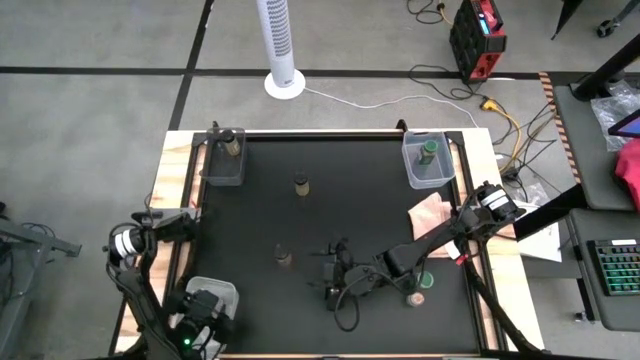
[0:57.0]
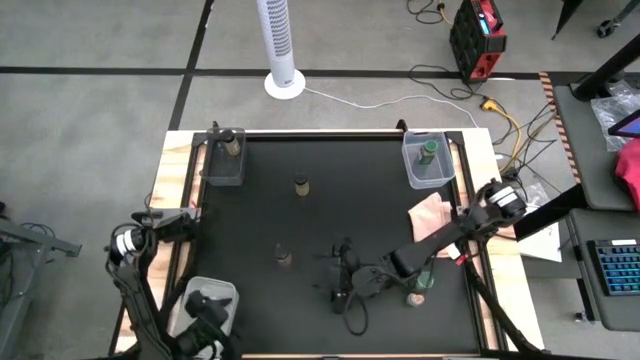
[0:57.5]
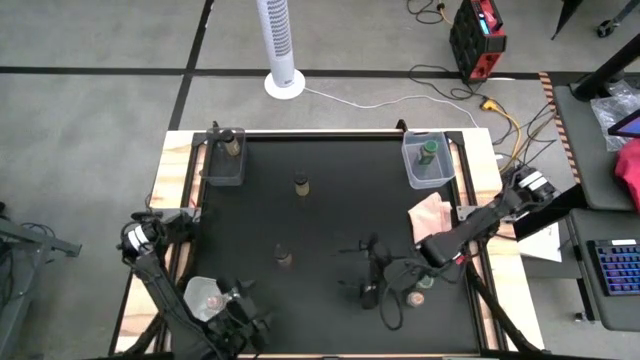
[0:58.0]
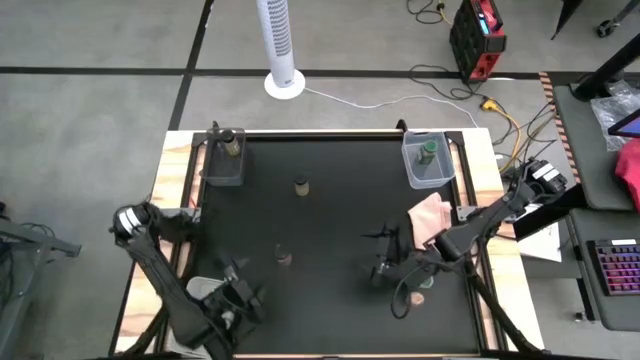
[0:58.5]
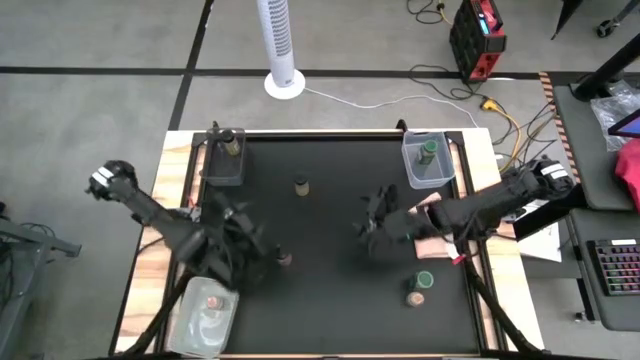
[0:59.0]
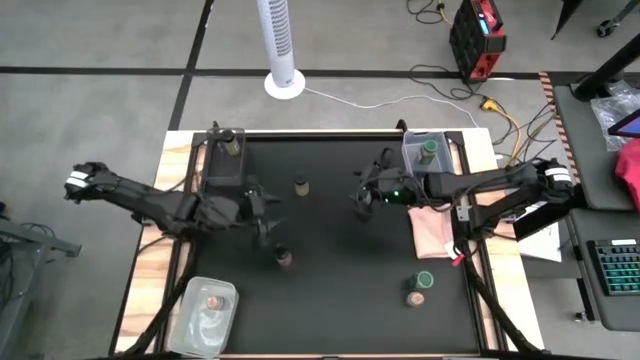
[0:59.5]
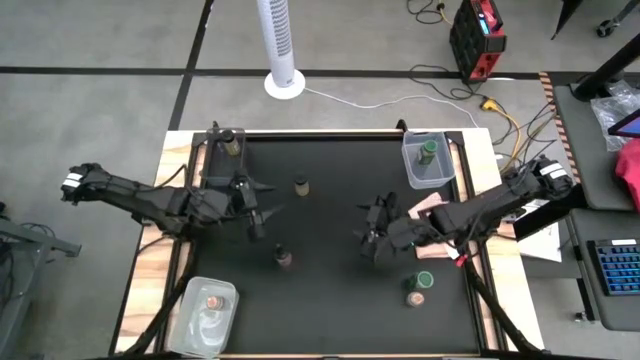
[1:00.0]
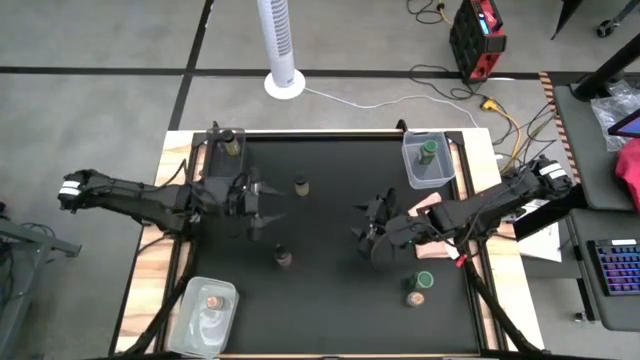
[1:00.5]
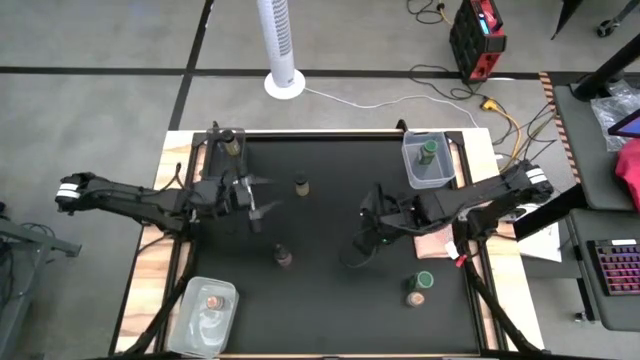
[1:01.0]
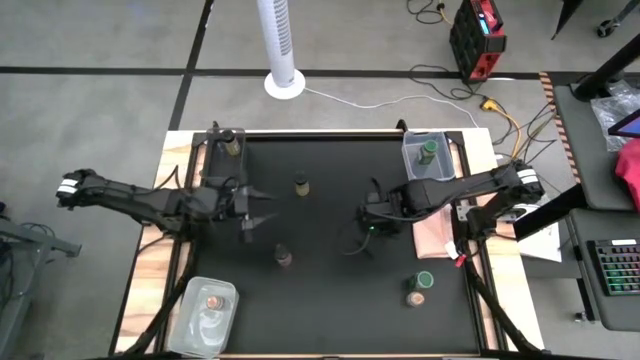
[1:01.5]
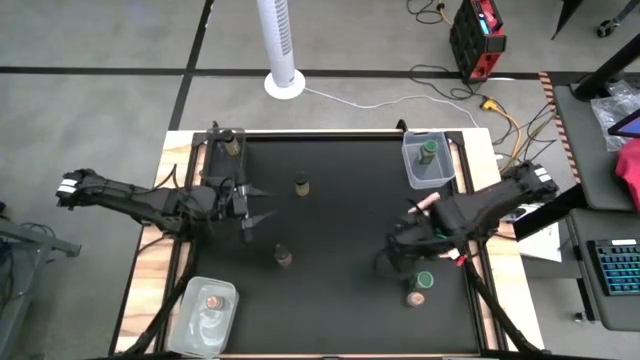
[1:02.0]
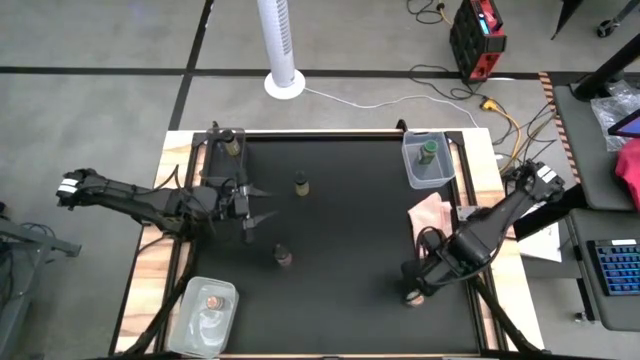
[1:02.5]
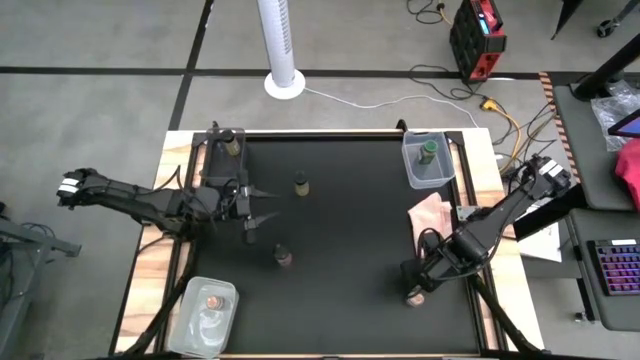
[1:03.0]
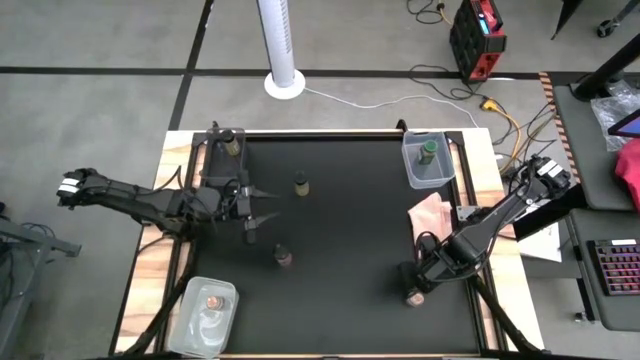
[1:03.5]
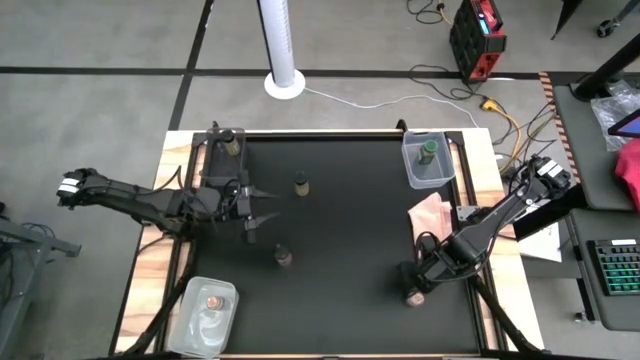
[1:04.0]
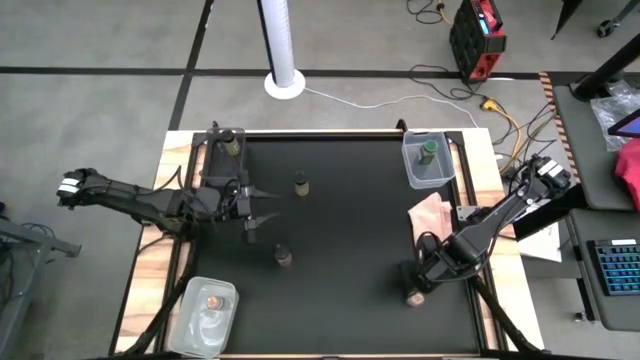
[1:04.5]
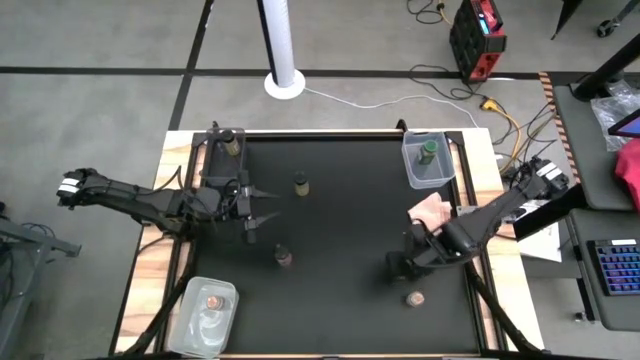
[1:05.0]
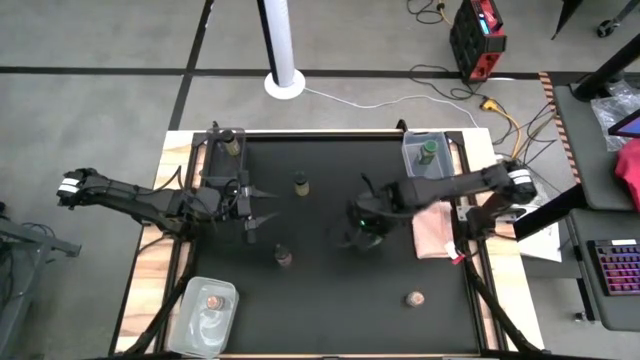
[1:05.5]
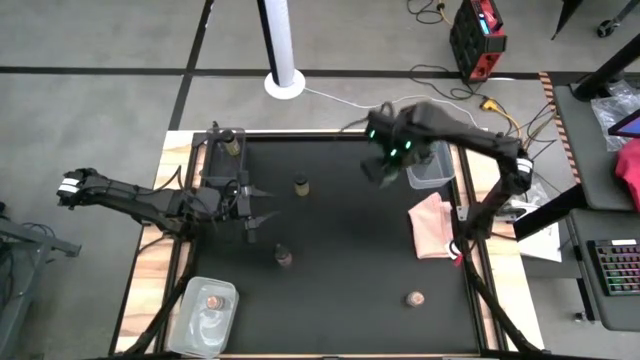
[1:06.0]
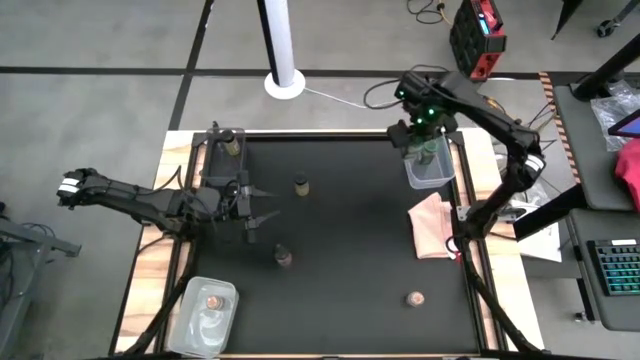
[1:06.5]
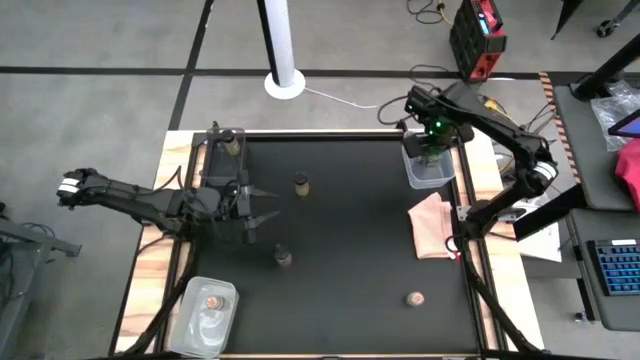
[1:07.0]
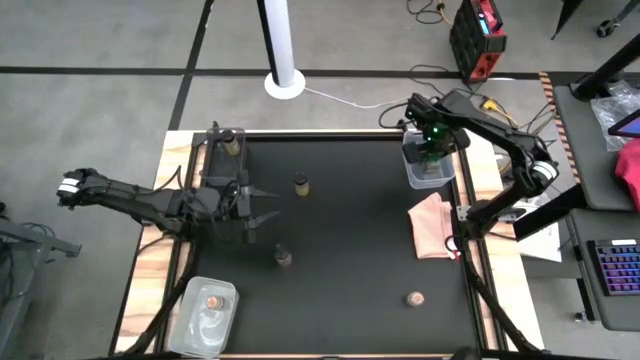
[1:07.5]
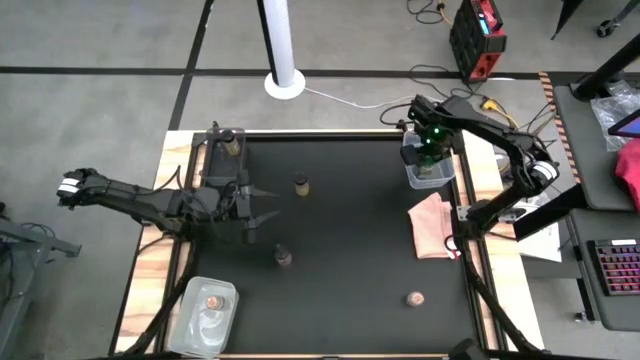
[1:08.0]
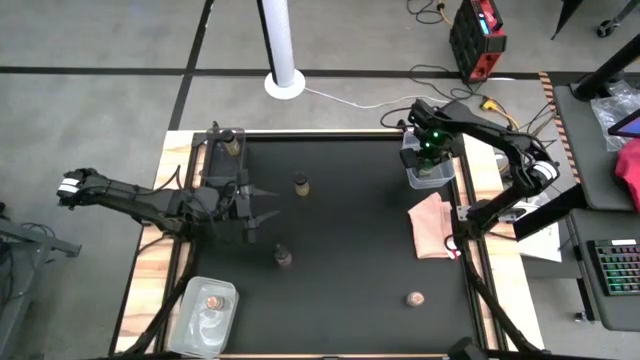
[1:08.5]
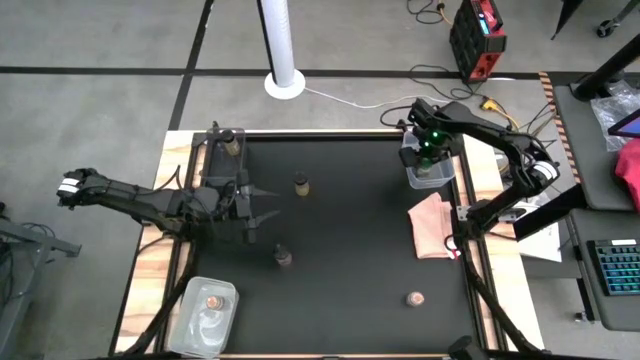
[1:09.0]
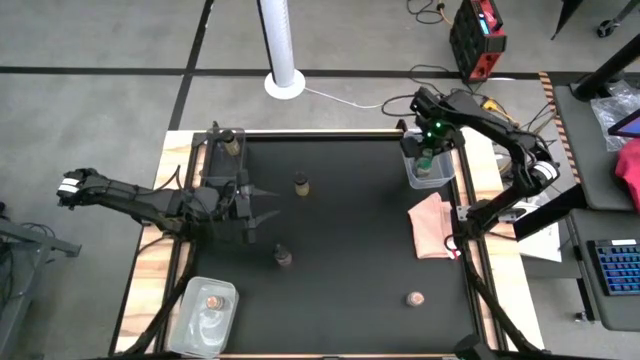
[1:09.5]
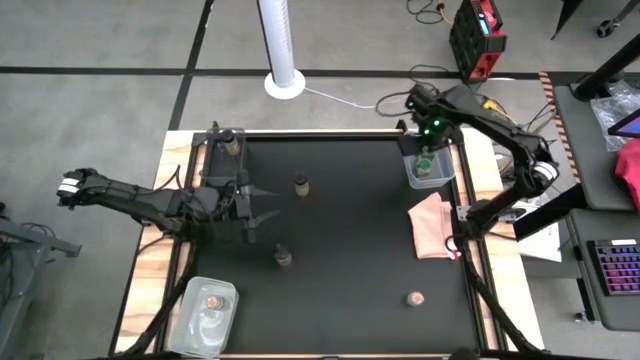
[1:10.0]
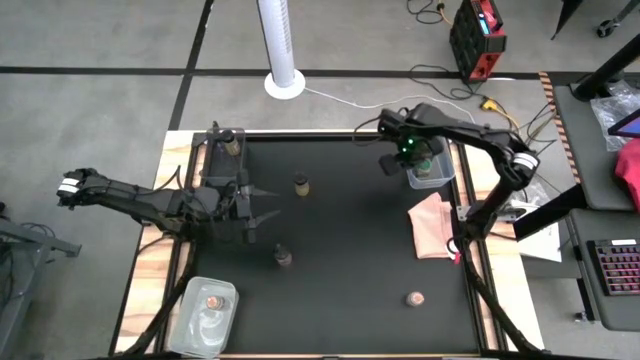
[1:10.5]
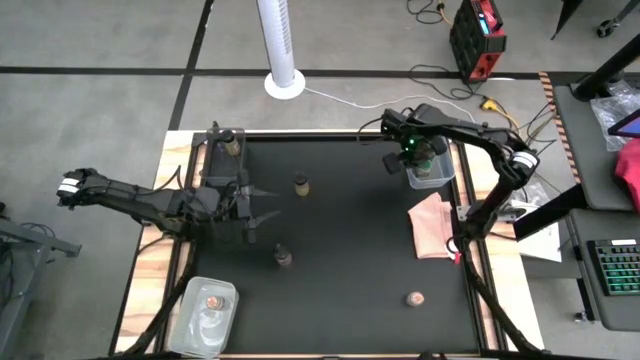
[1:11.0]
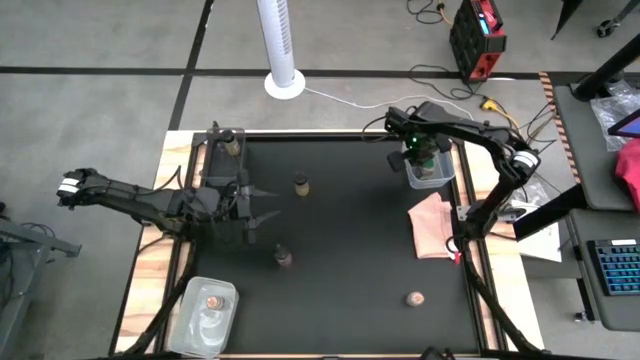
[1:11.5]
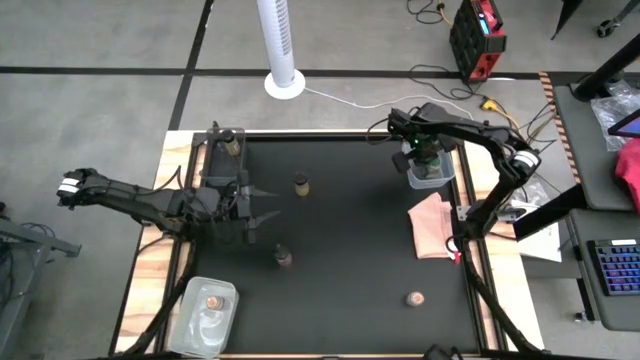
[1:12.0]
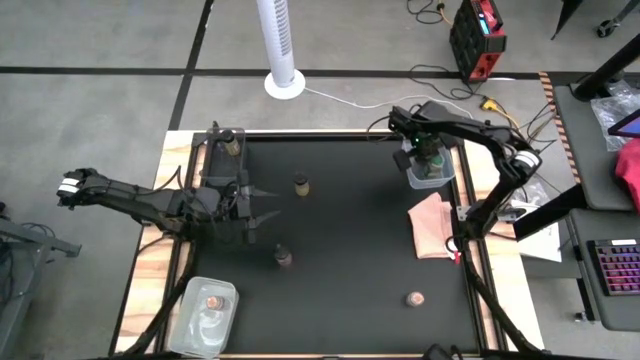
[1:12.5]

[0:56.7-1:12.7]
Task: Sort spices by type
Put the green spice bottle into the transparent bin

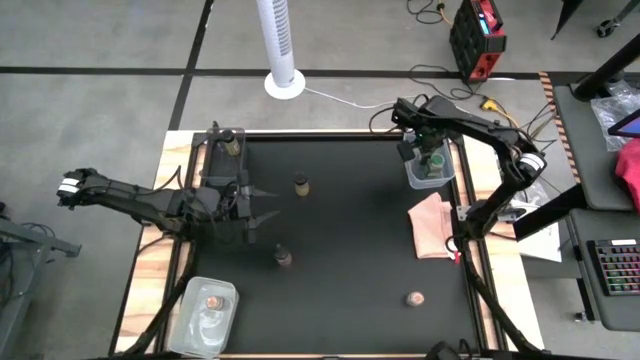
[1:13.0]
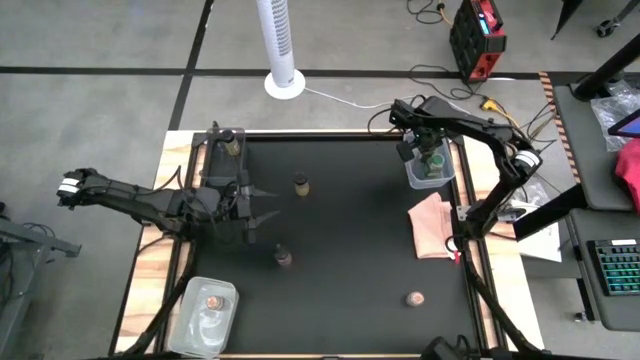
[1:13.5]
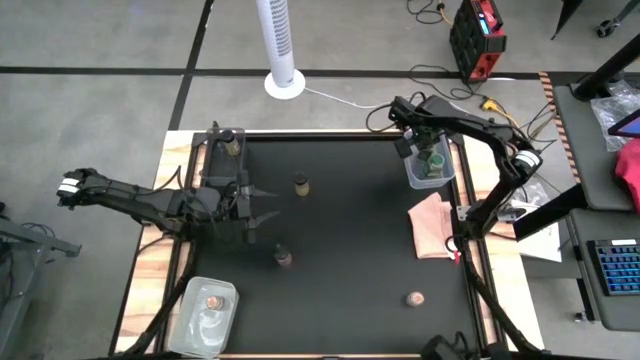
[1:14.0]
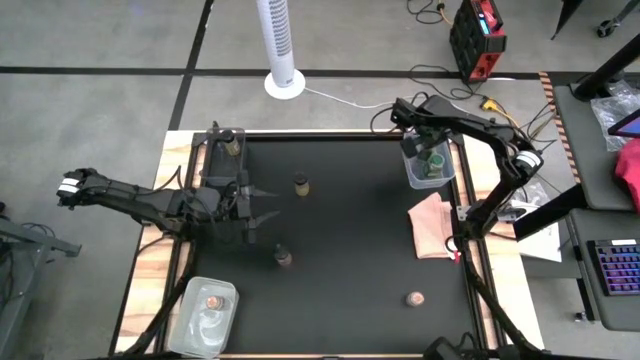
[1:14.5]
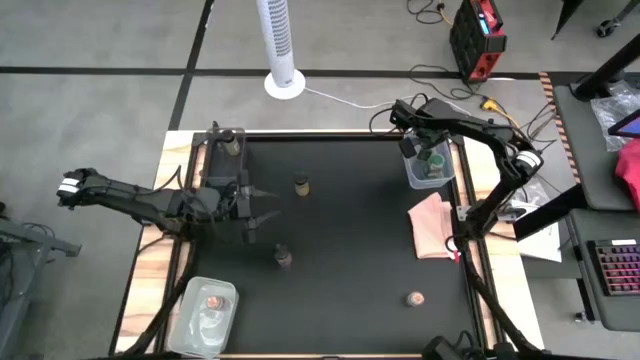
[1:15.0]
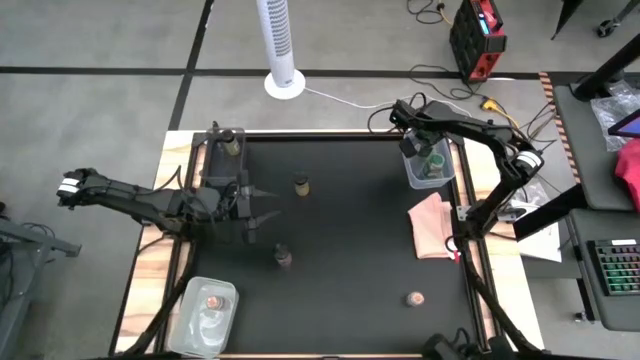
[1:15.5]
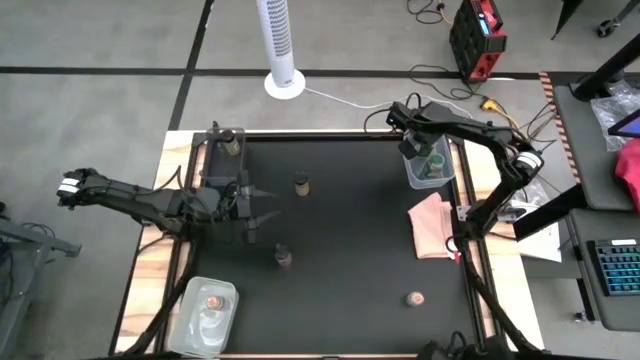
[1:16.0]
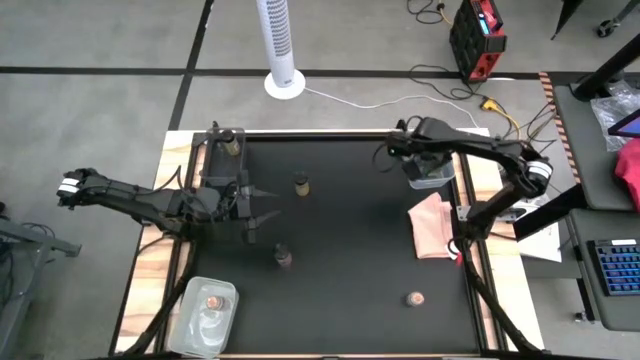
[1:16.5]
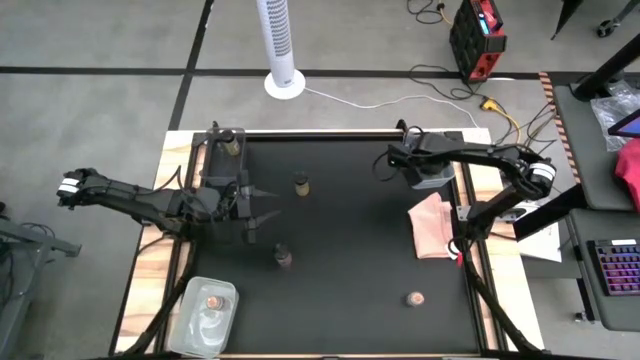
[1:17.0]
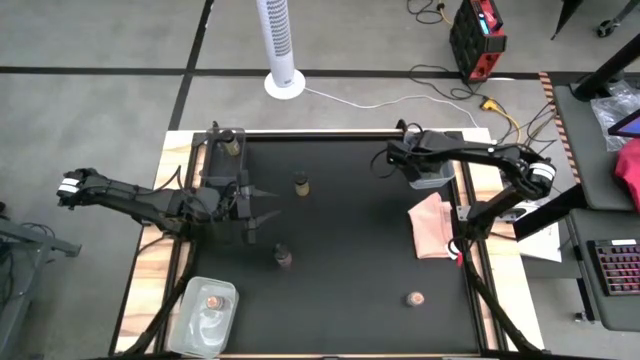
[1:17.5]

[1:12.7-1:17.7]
Adjust the green spice bottles in the white bin
